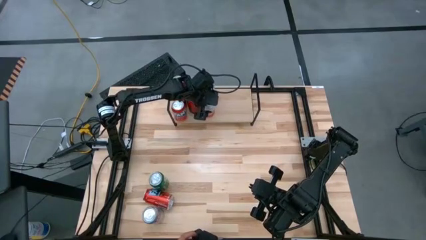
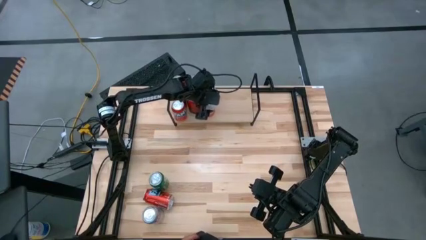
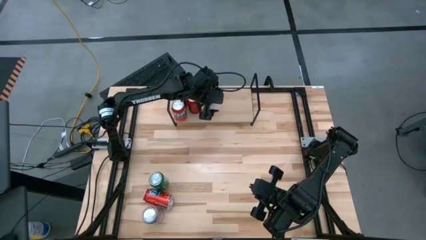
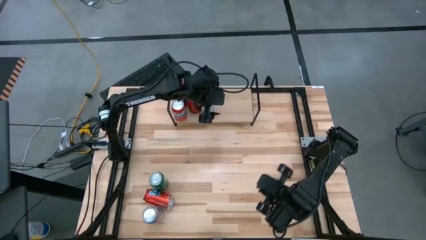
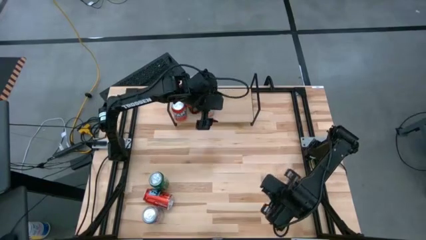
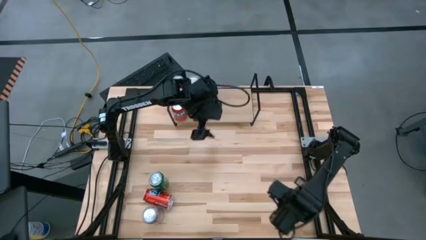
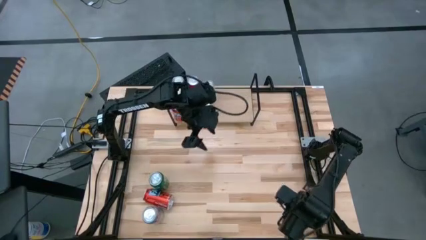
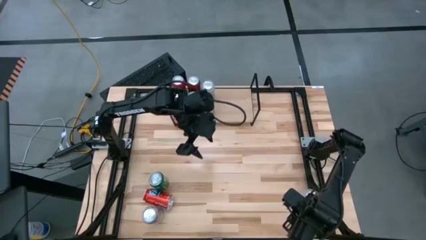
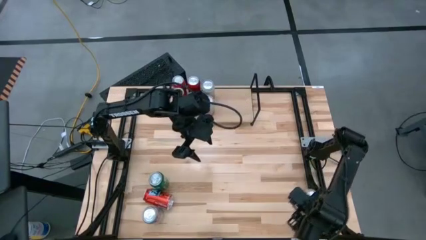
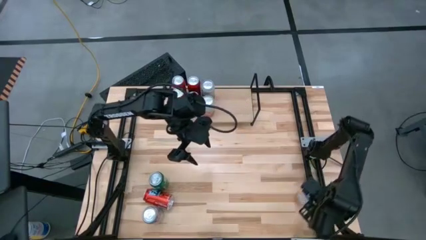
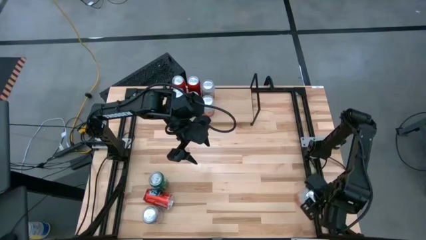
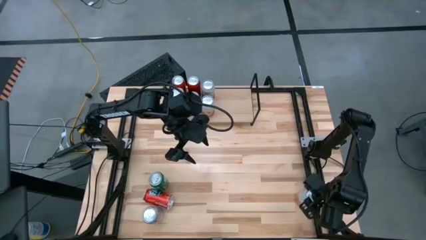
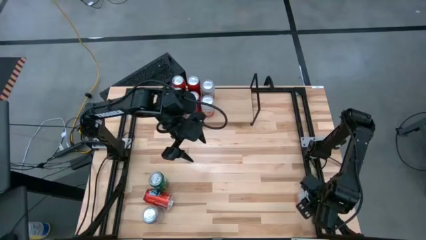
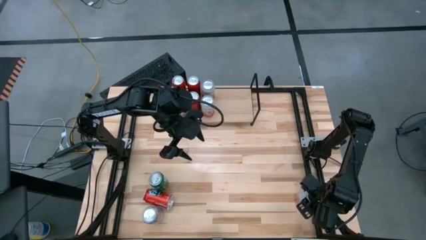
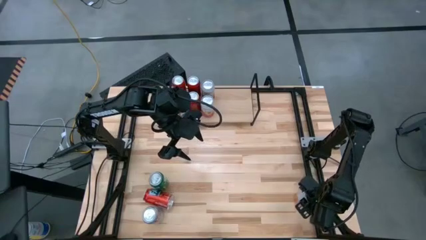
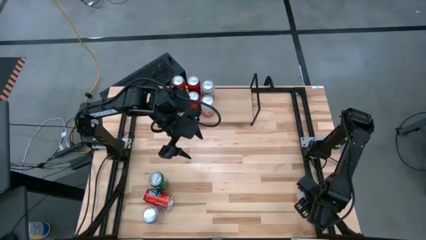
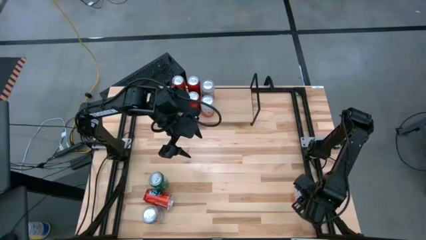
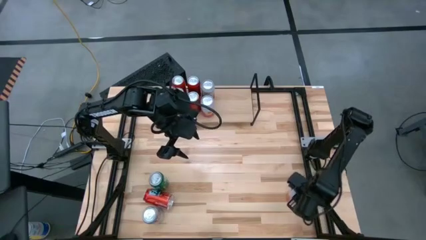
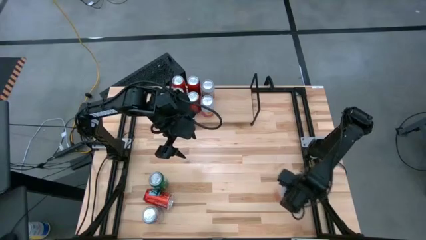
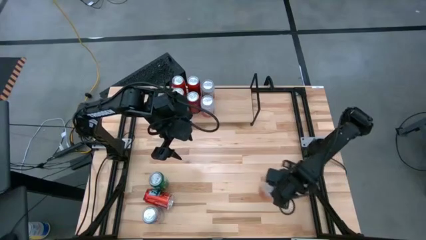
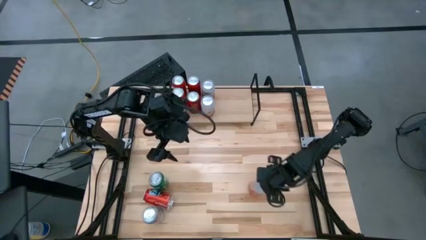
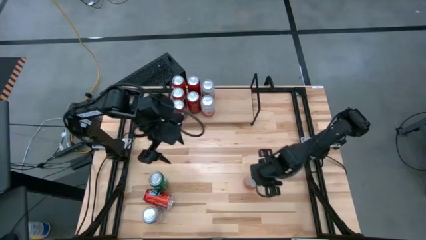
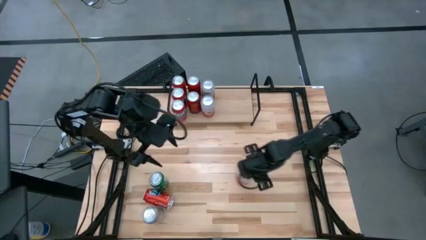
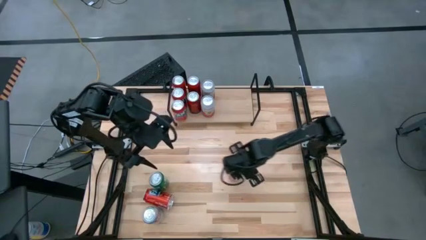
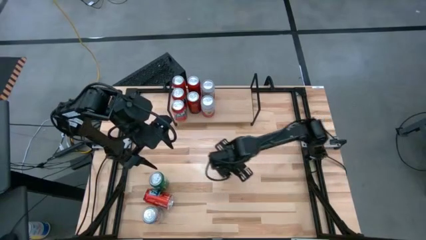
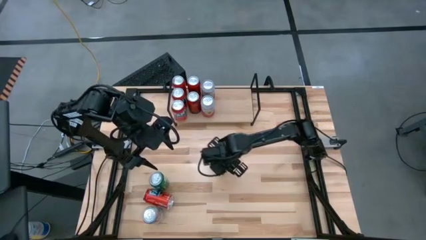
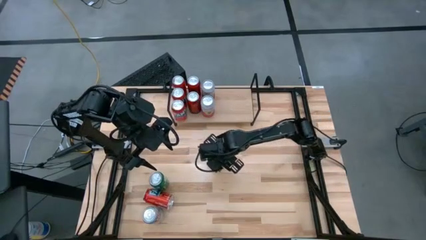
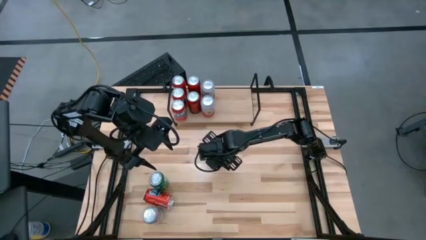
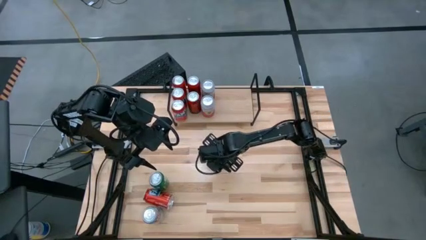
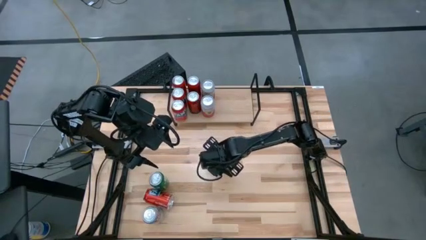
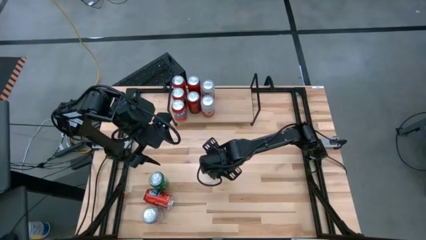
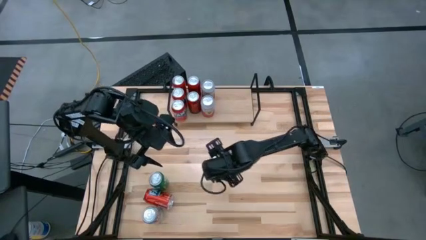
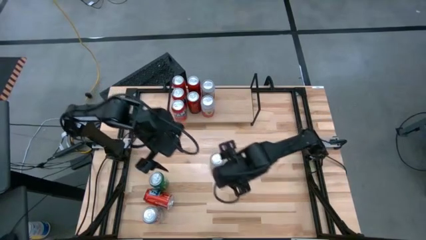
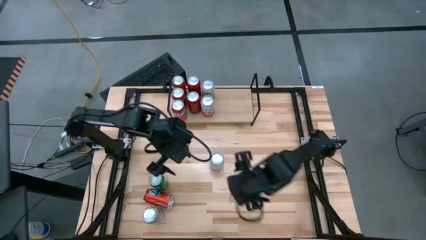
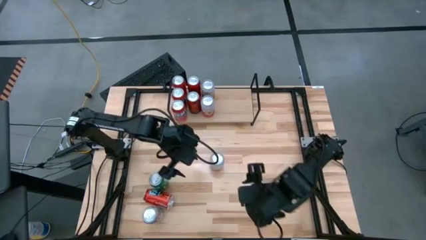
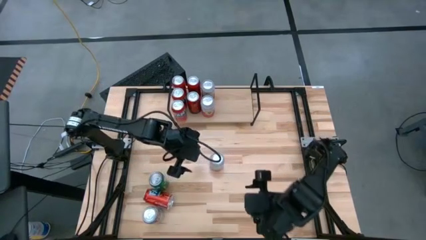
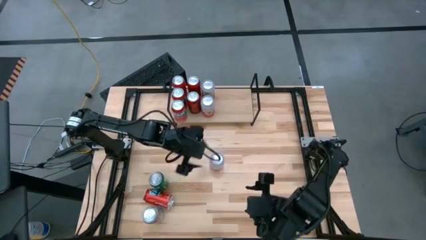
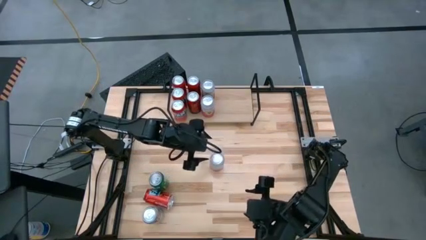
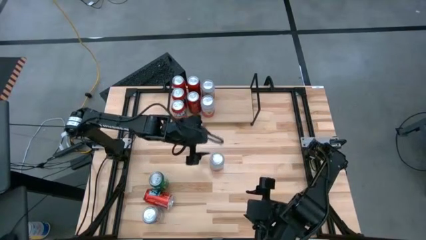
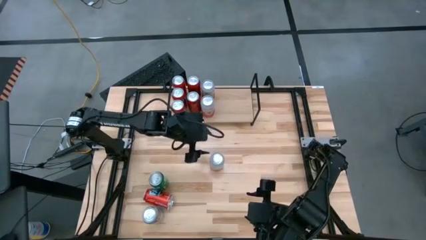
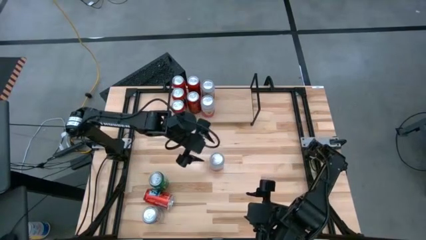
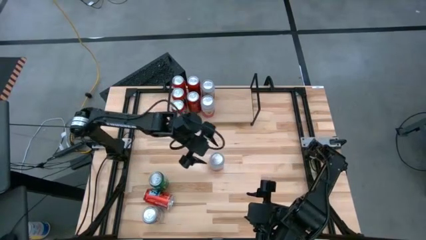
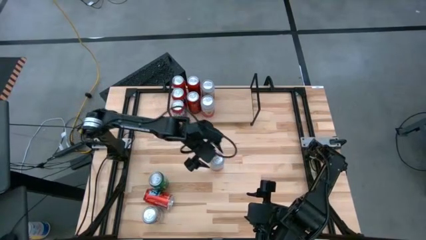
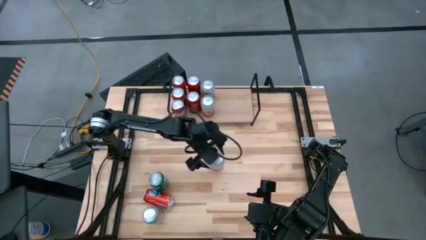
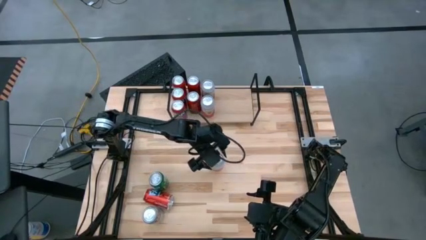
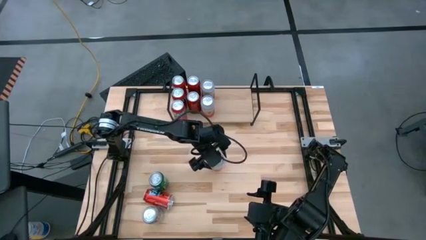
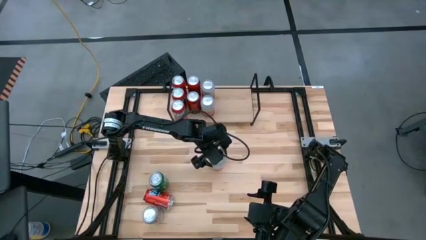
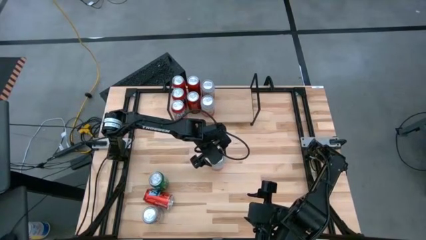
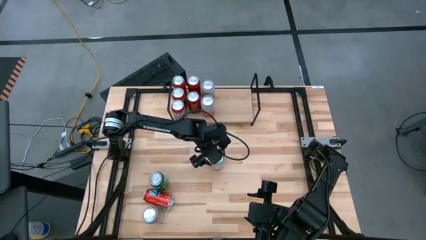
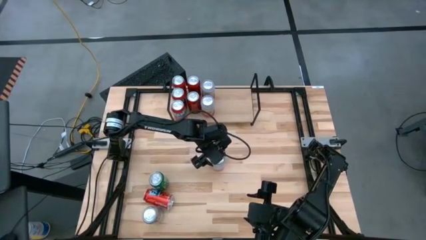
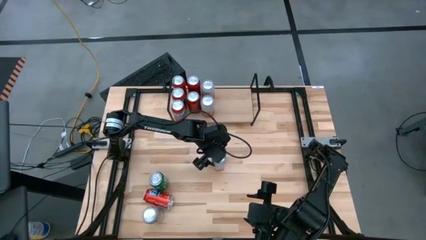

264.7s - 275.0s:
Task: Place canned beverage on shelf
Put the orange white soda can on the shelf and align with the pink white soda cans

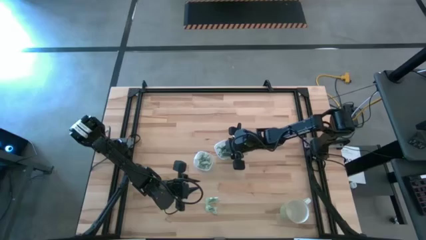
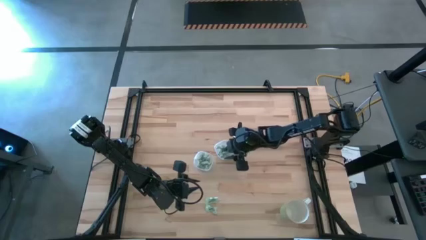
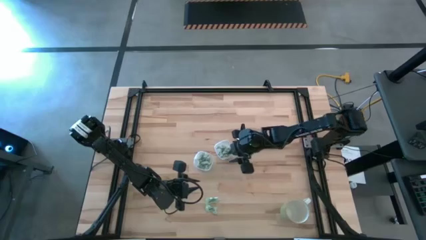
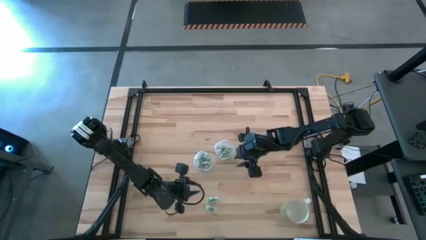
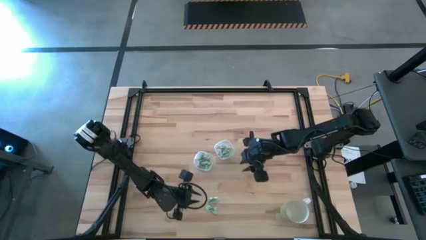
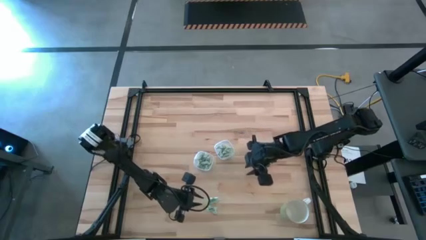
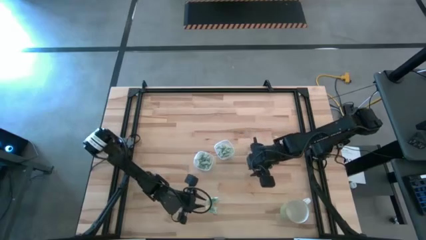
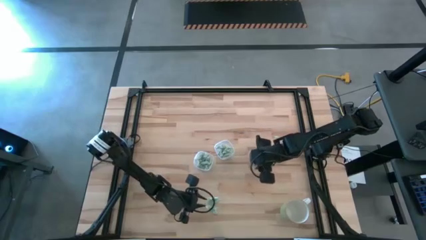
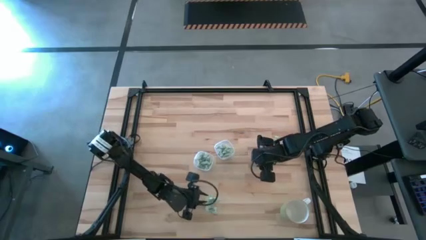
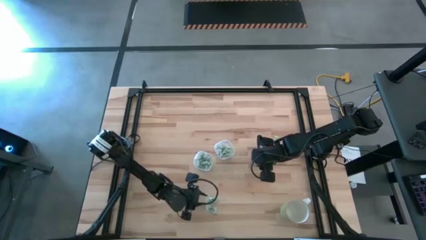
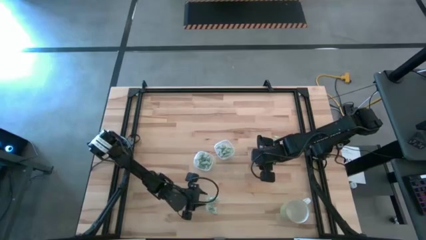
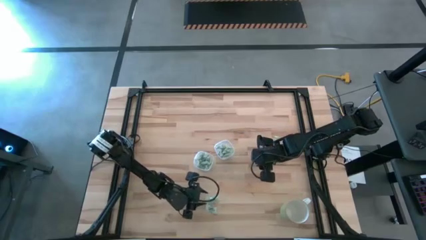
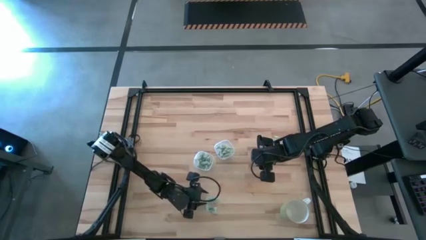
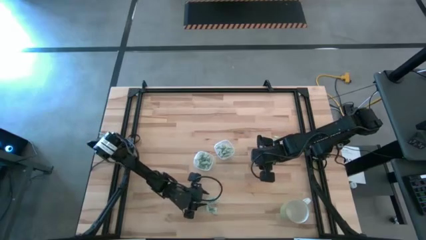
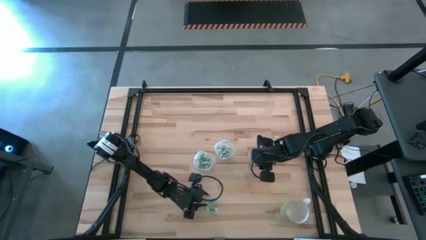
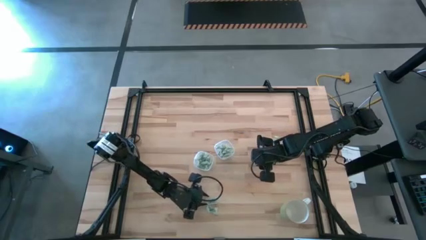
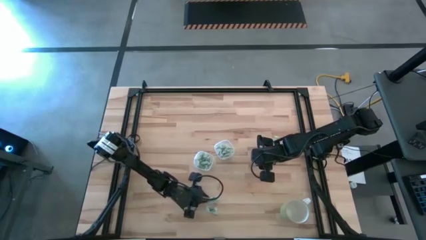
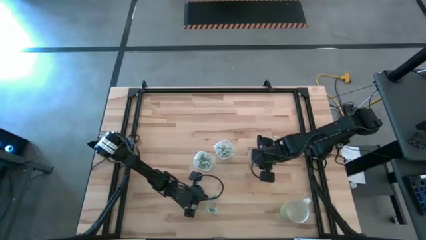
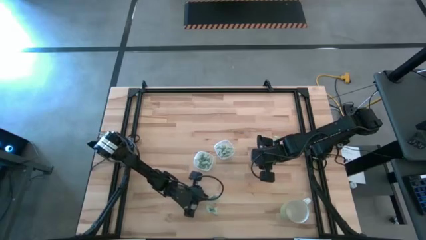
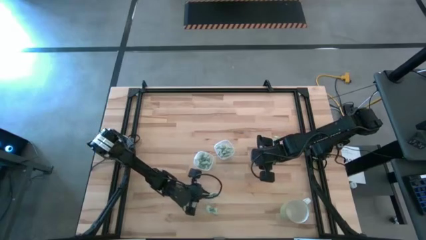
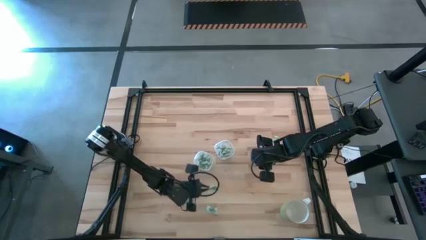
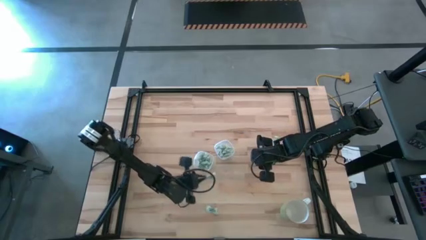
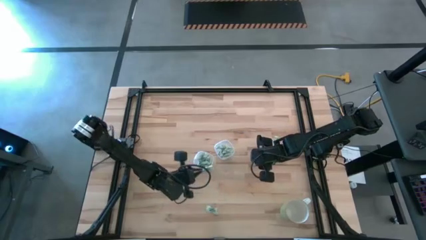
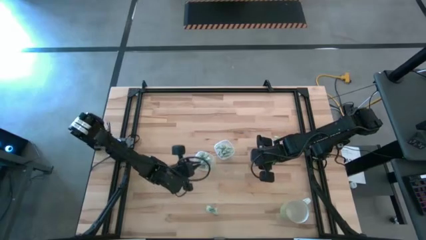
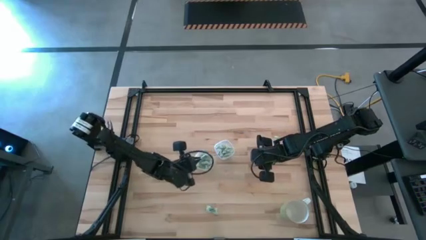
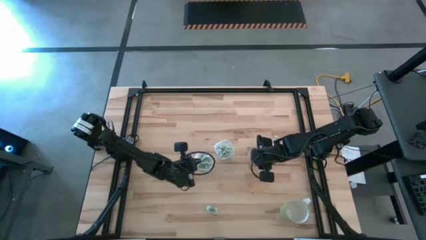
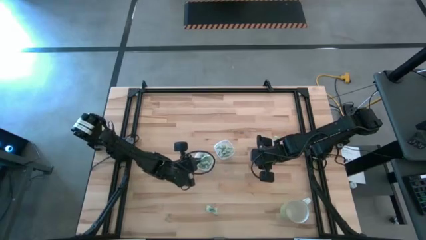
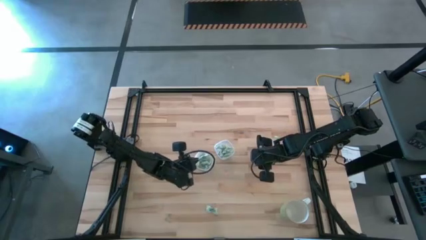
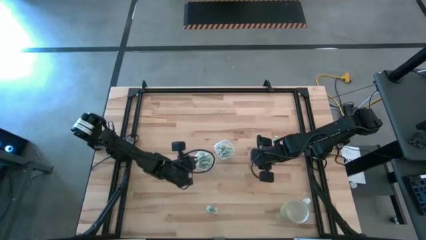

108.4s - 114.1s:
Task: Pick and place items into bin
Put the stevia packet into the left bin
